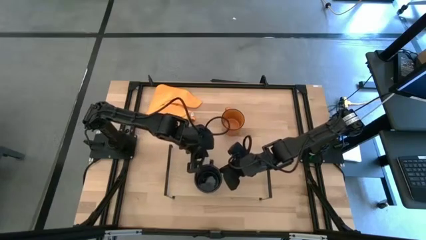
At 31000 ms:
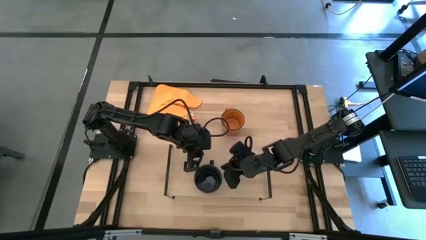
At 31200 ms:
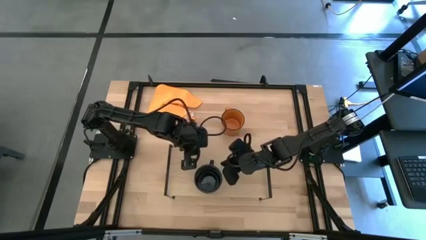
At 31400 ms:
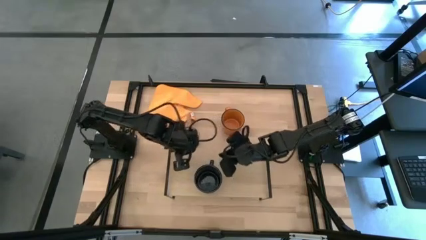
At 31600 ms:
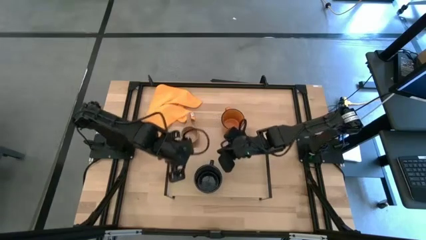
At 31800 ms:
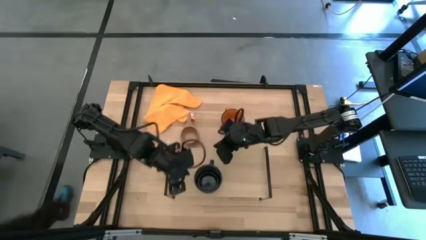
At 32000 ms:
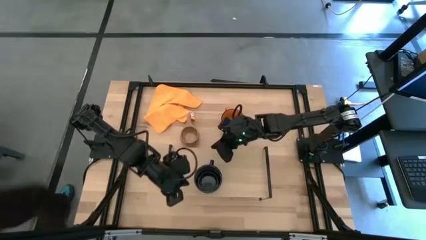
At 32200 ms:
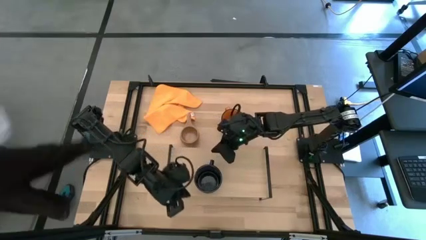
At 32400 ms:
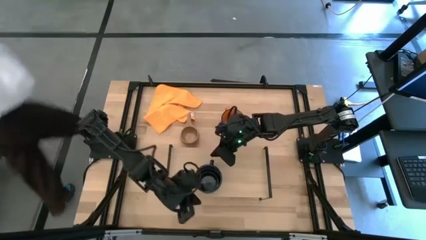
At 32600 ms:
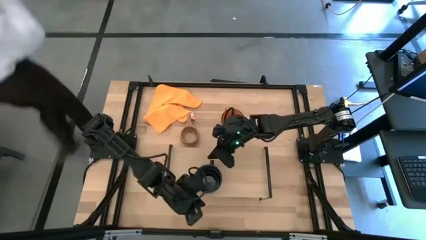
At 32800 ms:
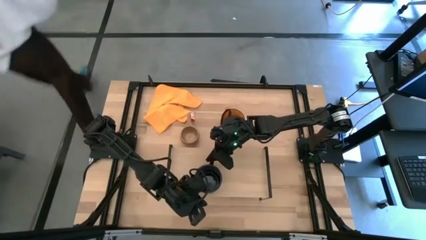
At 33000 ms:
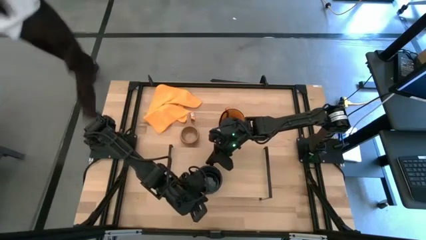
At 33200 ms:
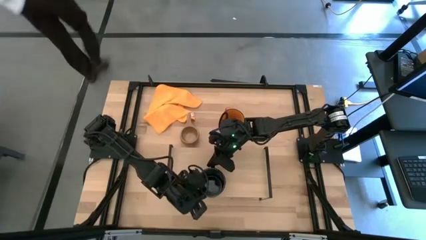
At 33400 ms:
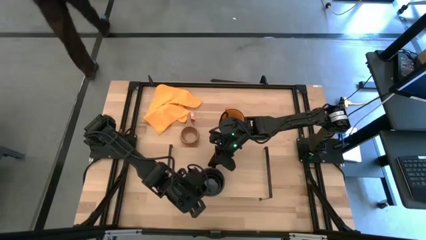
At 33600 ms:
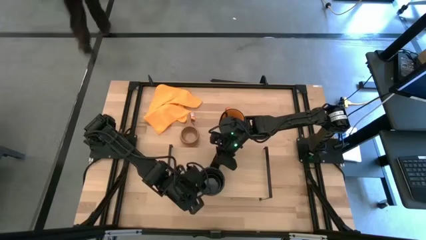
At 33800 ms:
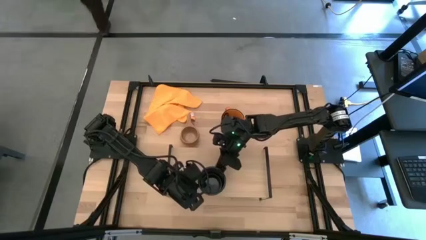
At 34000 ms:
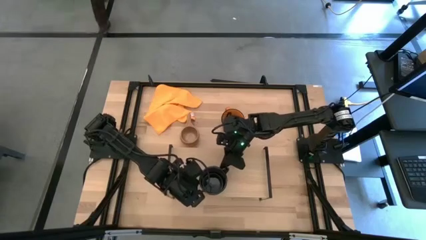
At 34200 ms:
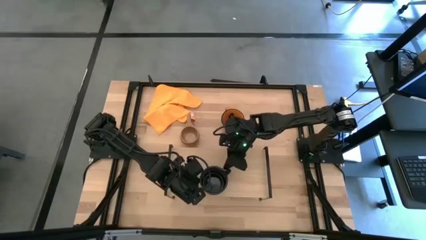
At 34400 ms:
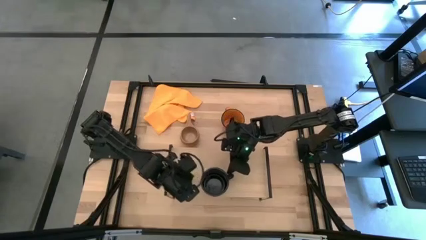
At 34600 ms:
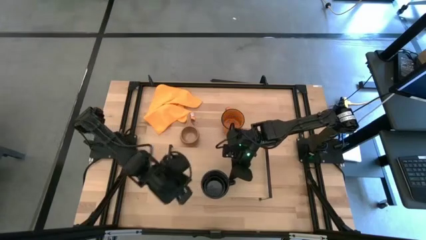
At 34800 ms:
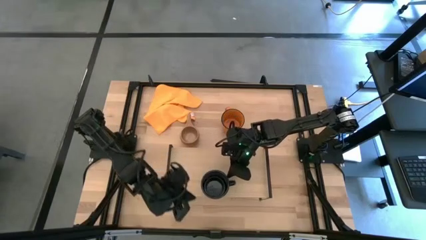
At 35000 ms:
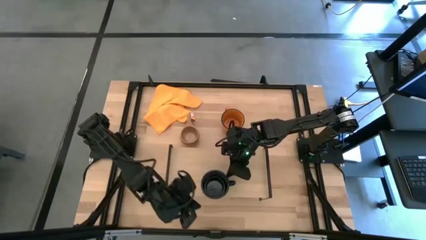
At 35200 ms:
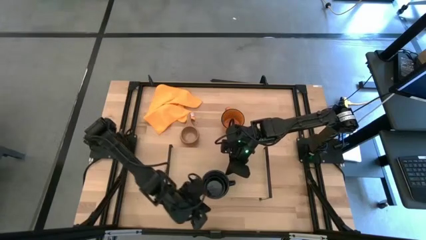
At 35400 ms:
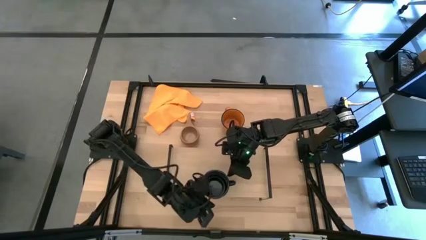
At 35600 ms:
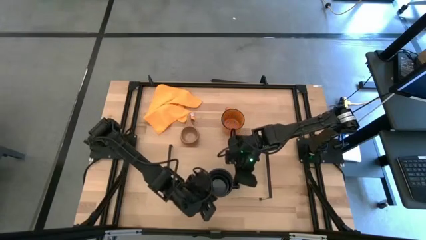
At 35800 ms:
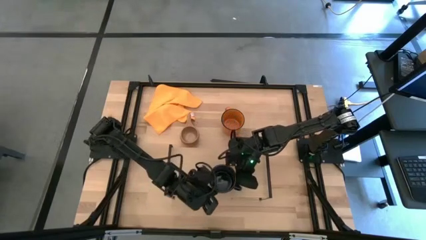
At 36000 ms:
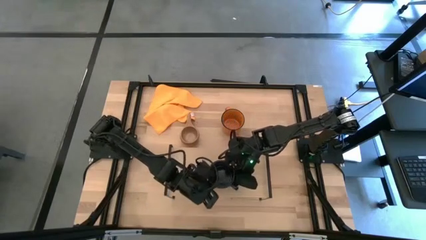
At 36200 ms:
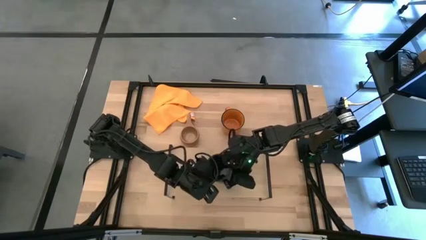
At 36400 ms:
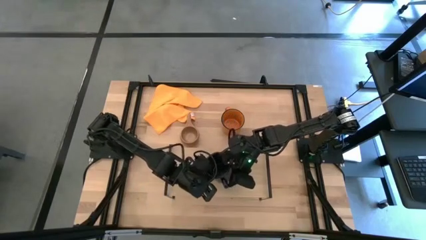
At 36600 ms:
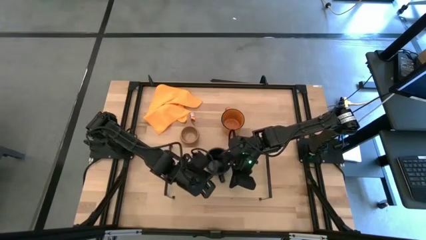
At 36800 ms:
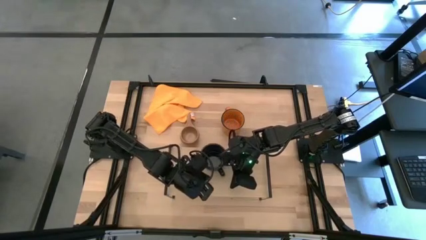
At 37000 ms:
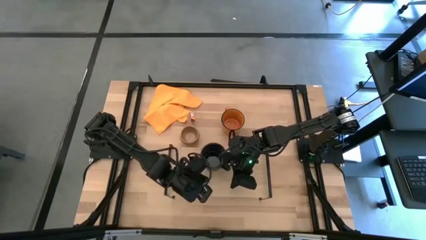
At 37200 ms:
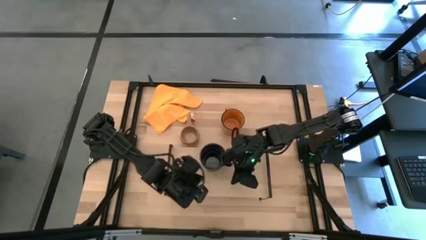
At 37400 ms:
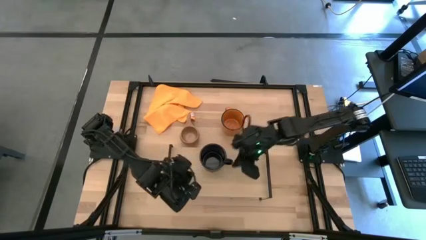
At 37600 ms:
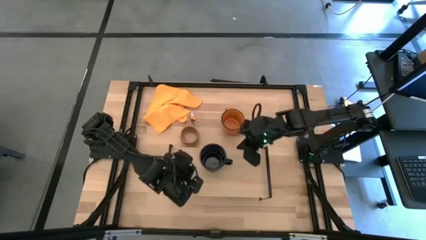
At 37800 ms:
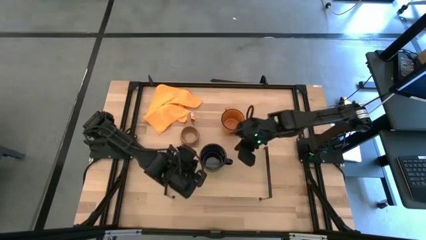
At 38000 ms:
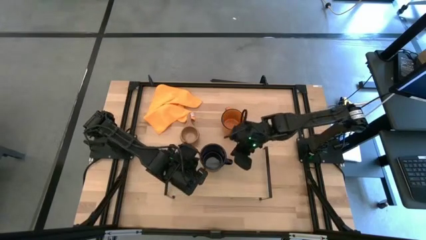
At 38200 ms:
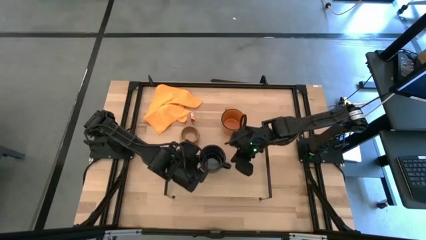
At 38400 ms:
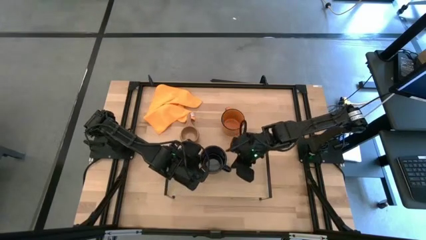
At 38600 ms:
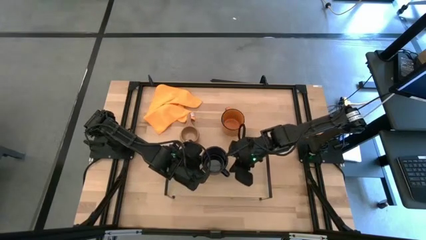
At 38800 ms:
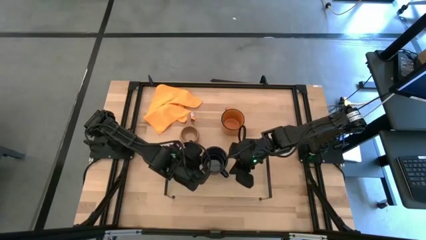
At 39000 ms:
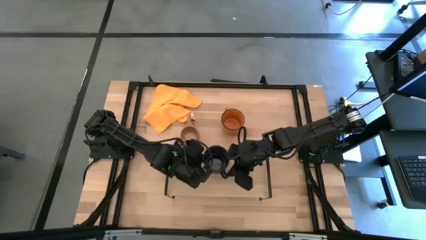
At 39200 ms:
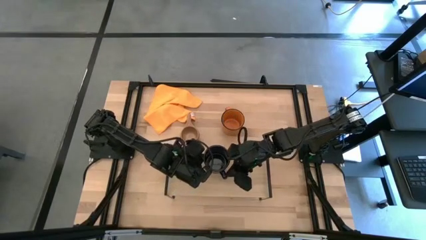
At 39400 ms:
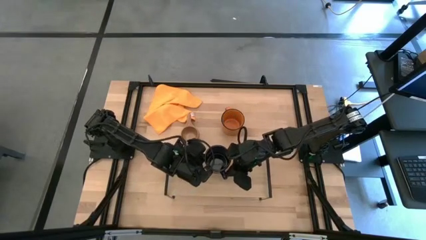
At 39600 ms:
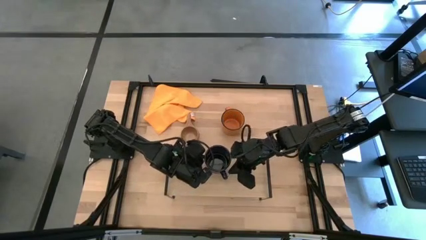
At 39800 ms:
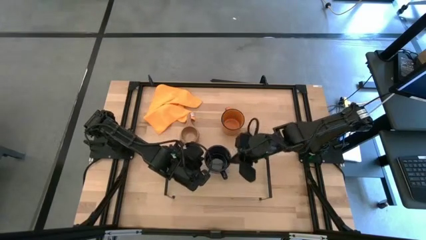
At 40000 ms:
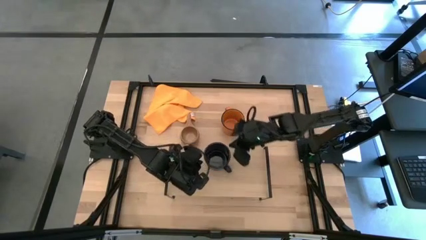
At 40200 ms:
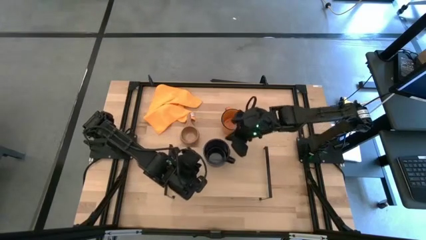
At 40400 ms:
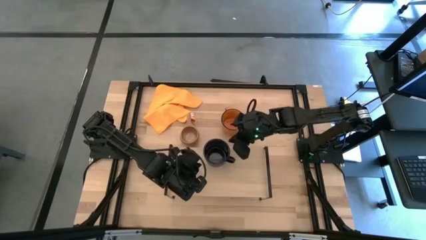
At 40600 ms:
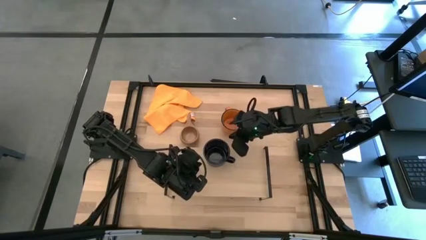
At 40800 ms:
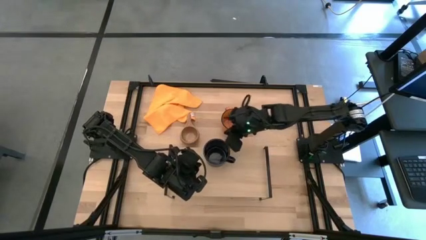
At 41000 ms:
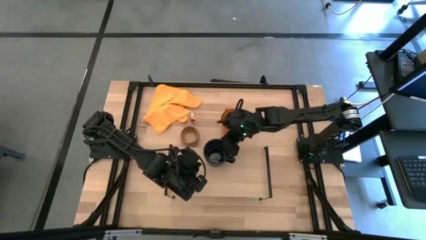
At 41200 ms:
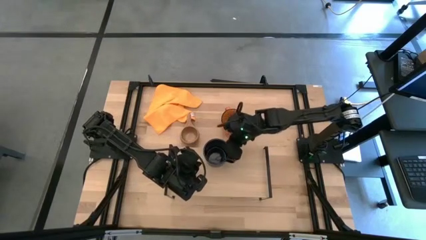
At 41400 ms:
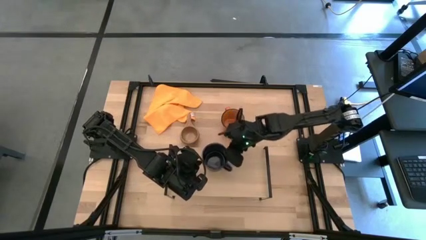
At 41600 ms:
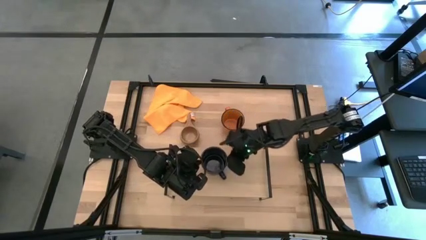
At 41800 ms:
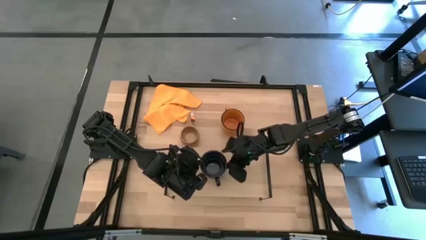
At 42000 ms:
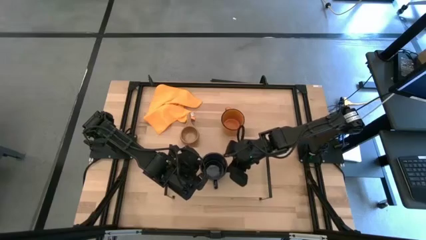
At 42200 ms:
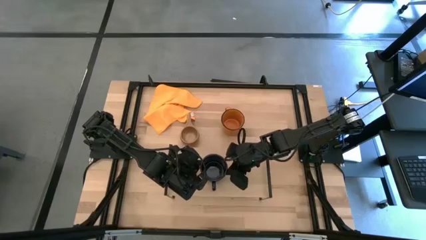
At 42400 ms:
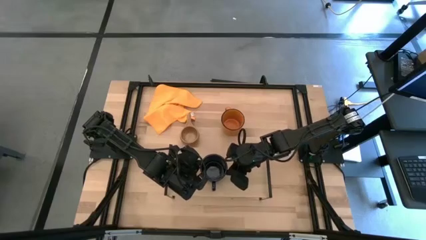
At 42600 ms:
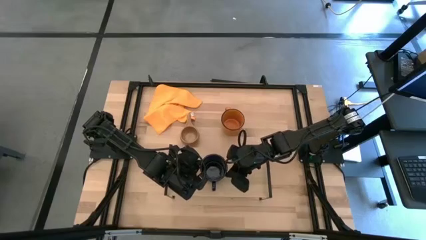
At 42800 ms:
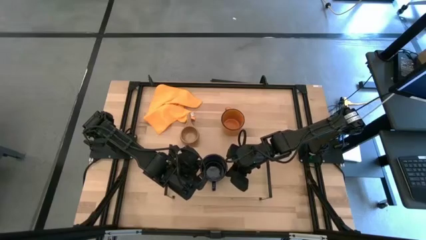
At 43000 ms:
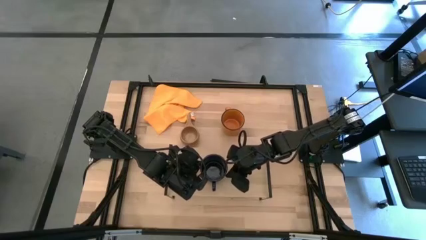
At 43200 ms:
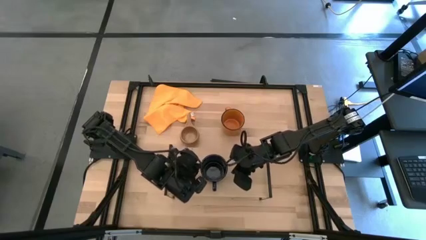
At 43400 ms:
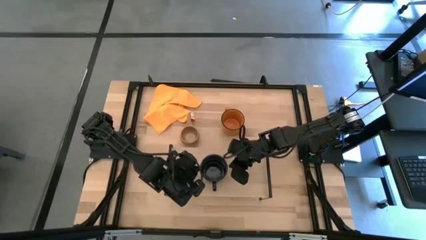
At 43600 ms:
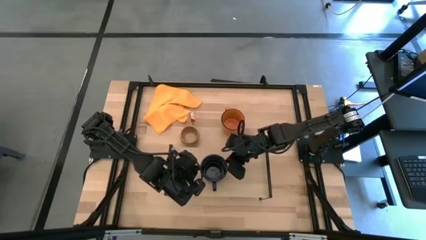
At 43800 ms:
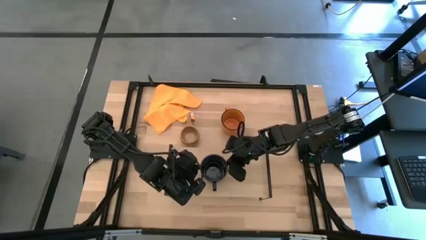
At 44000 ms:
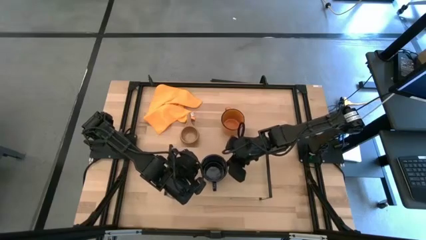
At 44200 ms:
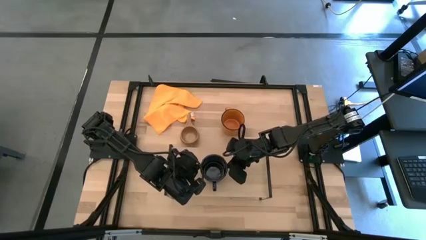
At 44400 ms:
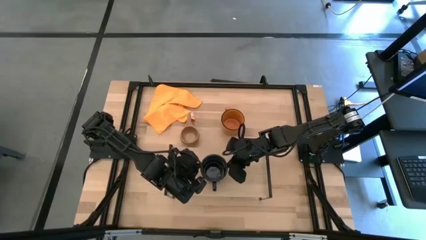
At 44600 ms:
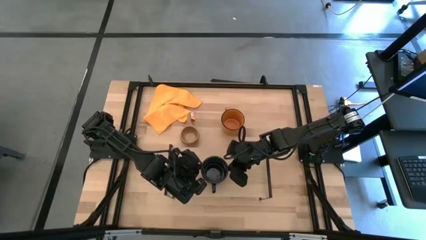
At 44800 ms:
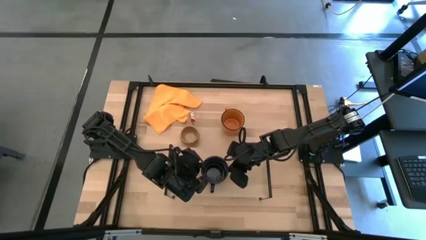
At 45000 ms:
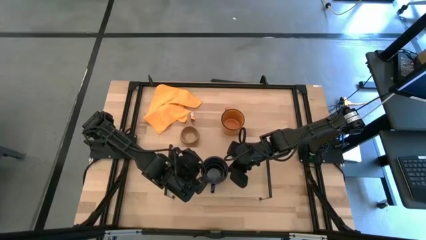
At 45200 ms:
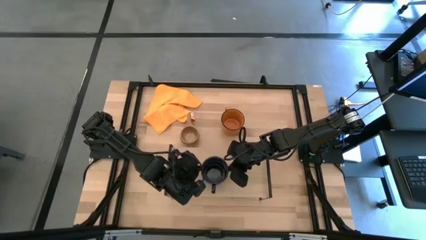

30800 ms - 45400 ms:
Task: Stack small to large cups/mugs on shelf
Put the dark blue mug on the shelf

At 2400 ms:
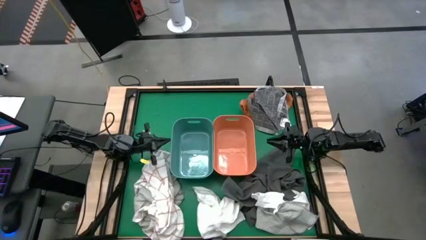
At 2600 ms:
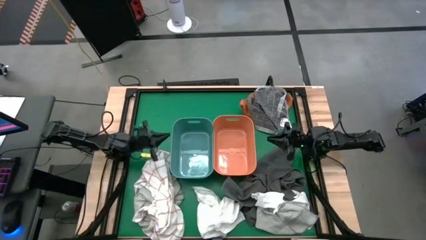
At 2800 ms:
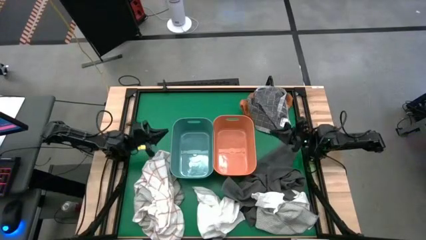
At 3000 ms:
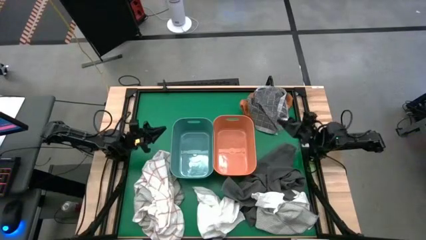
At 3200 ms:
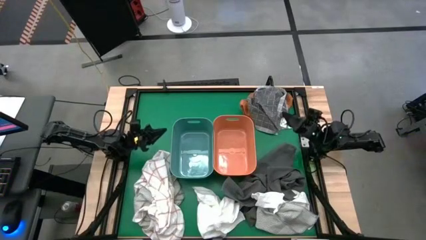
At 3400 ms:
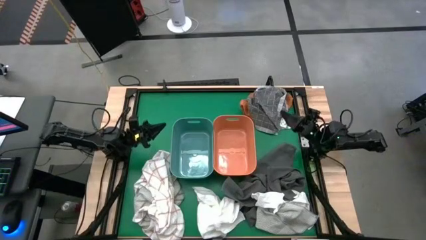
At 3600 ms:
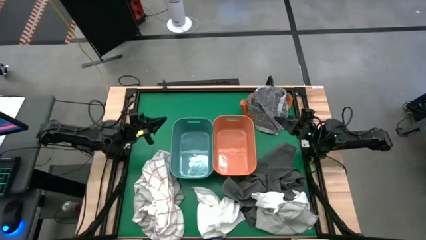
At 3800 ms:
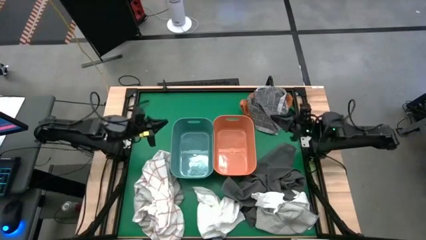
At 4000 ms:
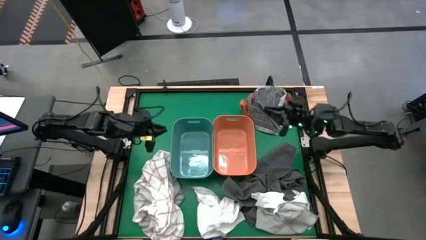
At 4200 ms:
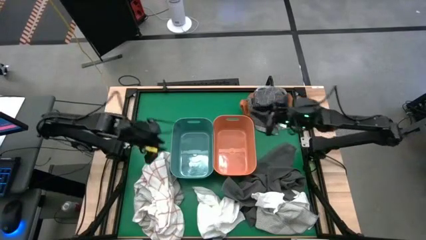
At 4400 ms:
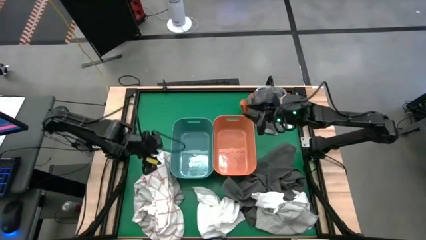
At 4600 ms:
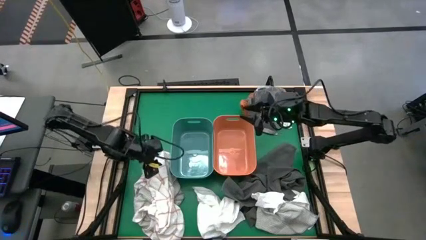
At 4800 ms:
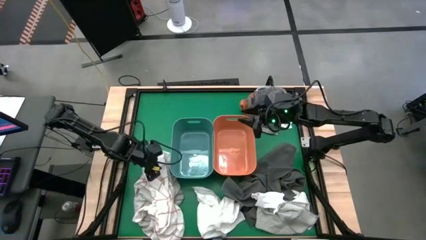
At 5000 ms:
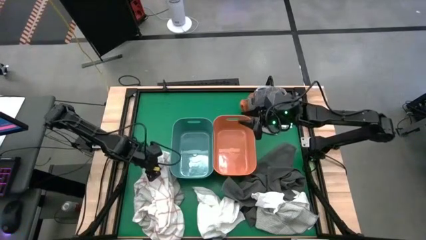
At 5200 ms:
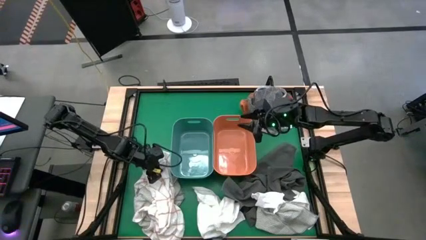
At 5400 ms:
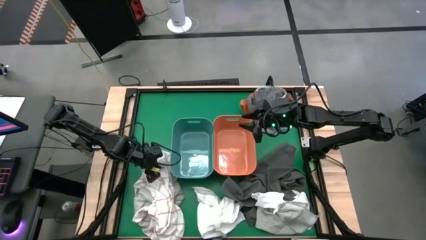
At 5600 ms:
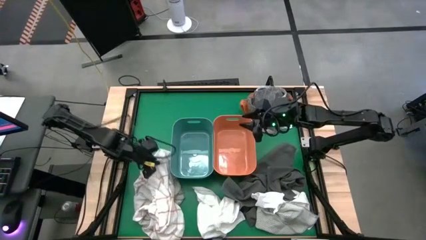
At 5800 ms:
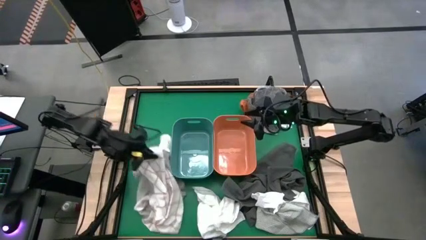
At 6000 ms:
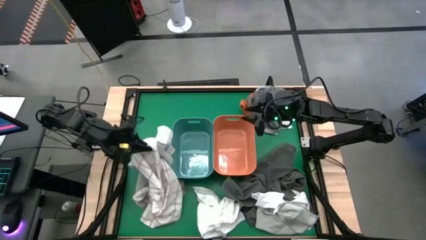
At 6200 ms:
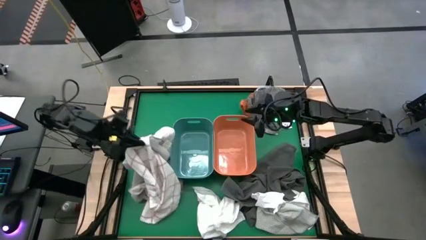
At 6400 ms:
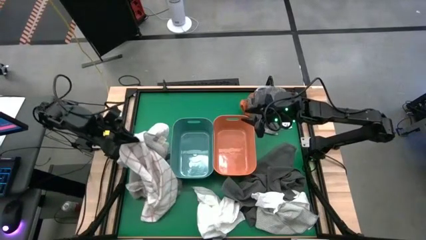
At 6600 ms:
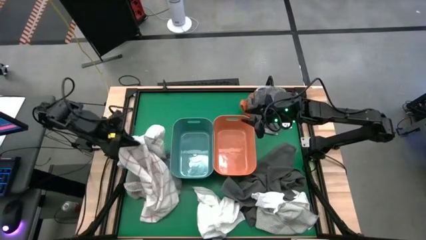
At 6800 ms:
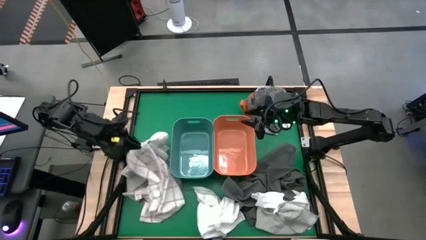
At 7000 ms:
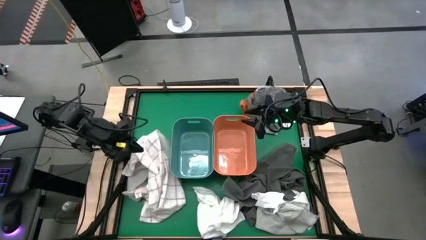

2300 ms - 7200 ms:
Task: Sort towels by color in basket
Put the white patterned towel into the green bin
